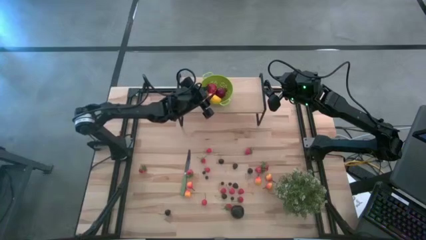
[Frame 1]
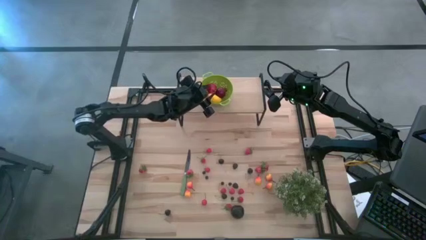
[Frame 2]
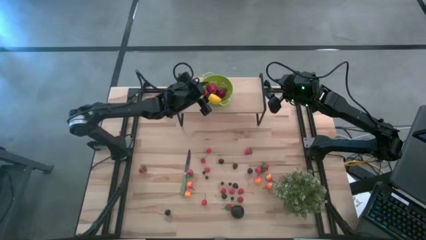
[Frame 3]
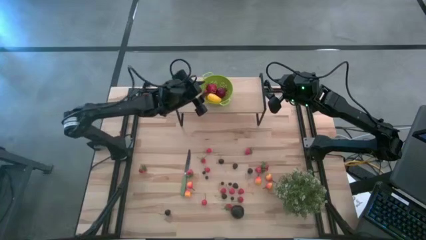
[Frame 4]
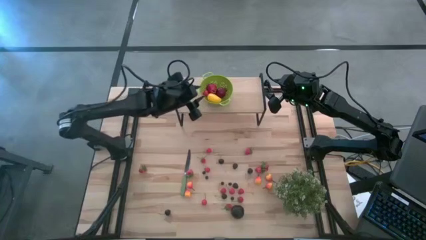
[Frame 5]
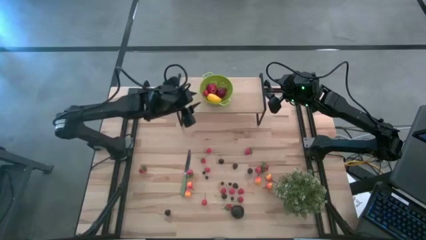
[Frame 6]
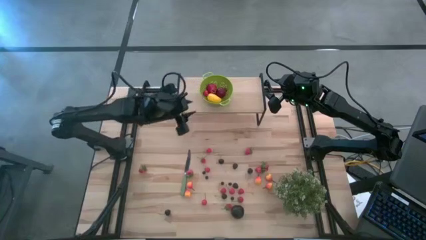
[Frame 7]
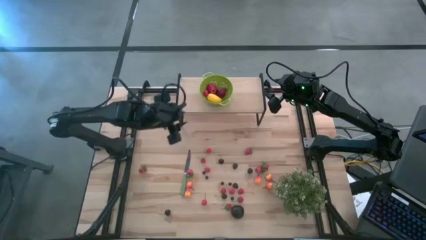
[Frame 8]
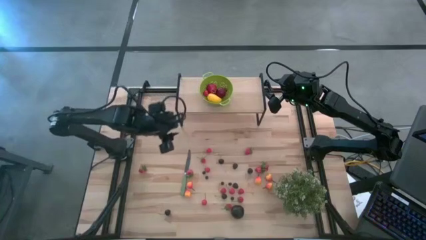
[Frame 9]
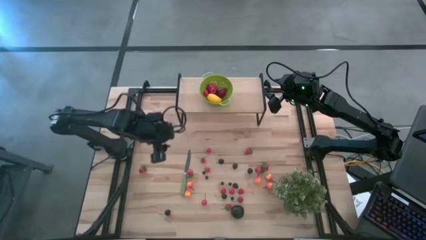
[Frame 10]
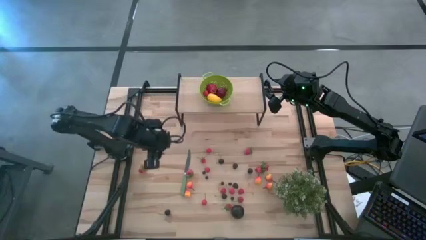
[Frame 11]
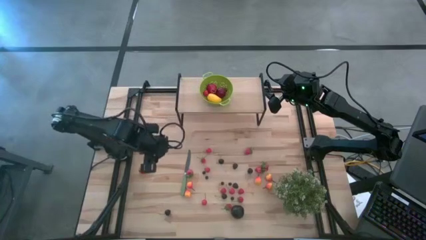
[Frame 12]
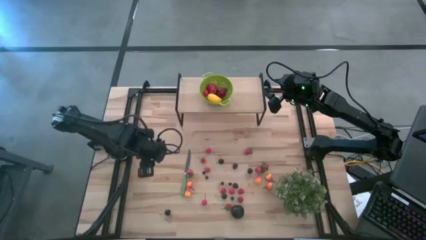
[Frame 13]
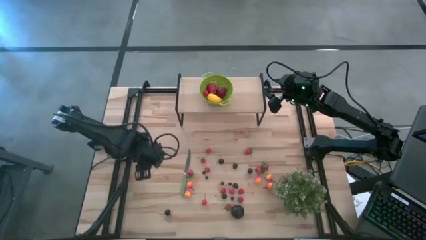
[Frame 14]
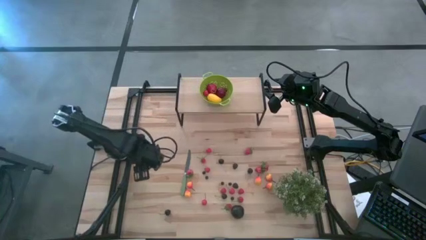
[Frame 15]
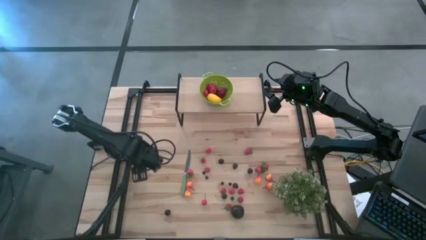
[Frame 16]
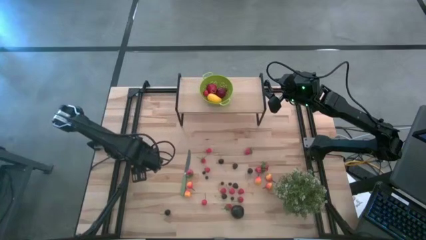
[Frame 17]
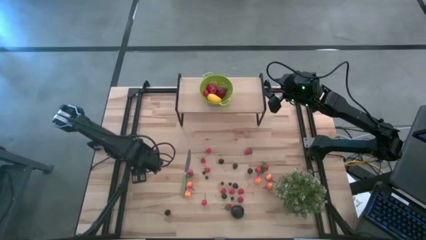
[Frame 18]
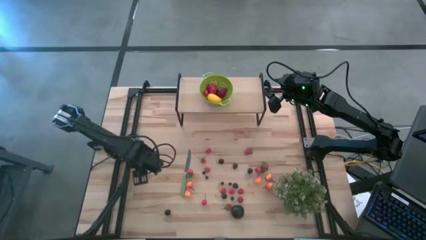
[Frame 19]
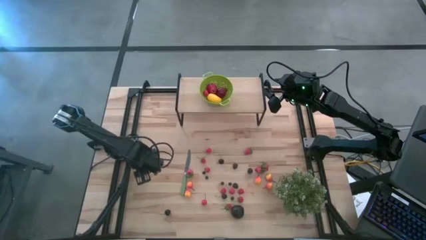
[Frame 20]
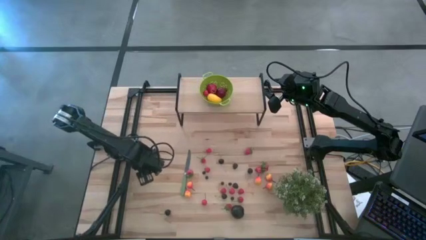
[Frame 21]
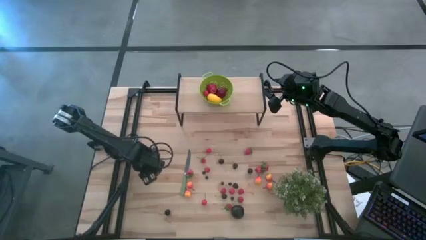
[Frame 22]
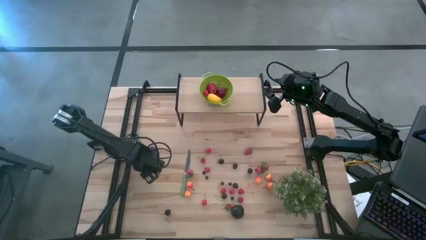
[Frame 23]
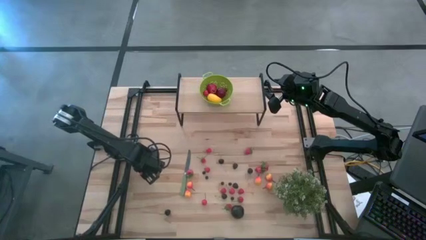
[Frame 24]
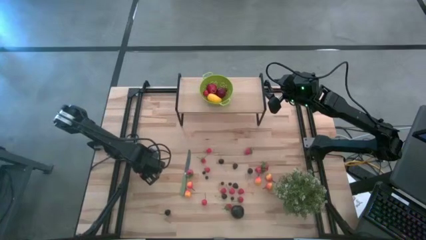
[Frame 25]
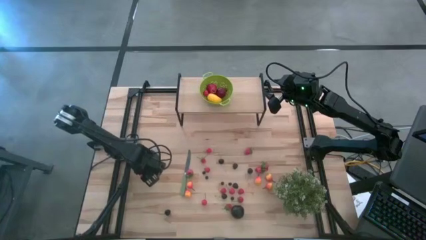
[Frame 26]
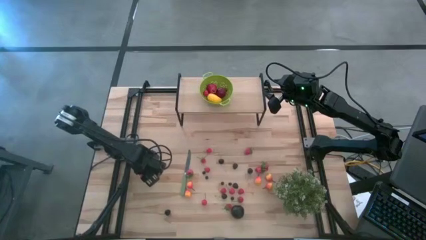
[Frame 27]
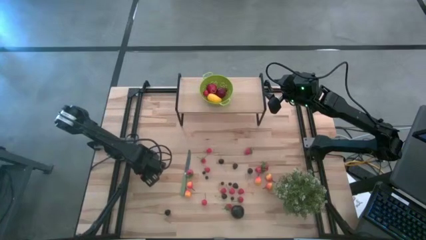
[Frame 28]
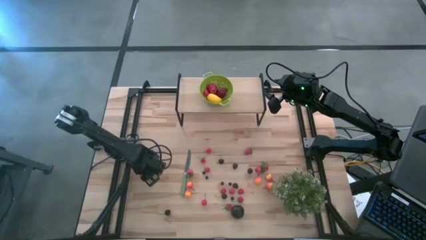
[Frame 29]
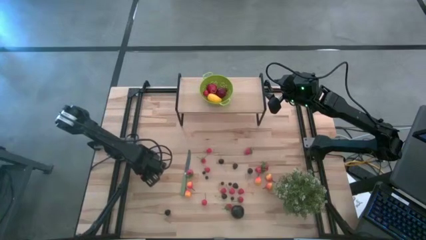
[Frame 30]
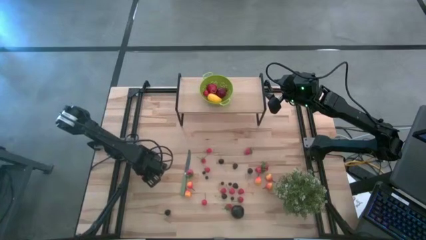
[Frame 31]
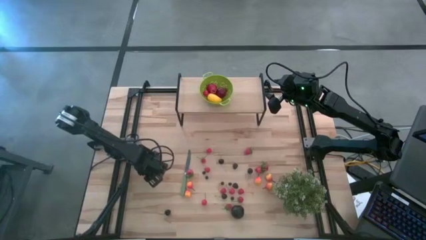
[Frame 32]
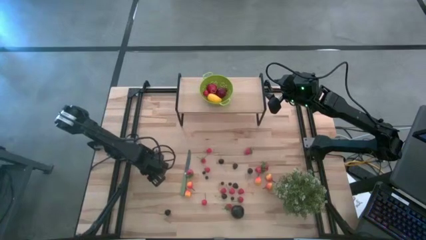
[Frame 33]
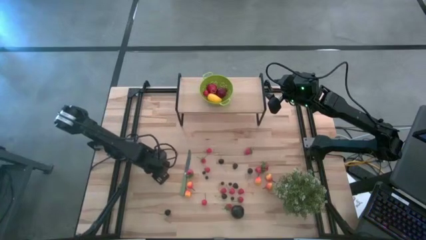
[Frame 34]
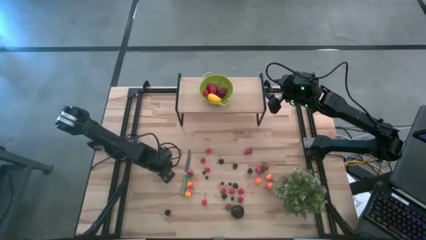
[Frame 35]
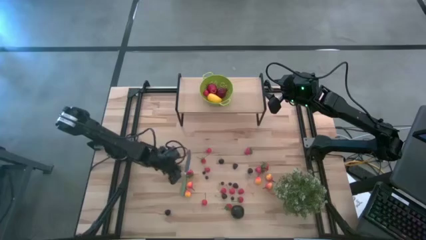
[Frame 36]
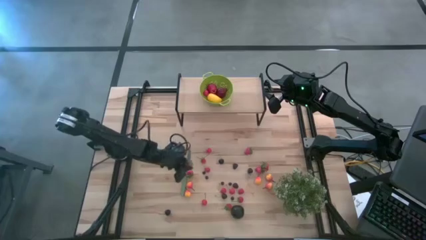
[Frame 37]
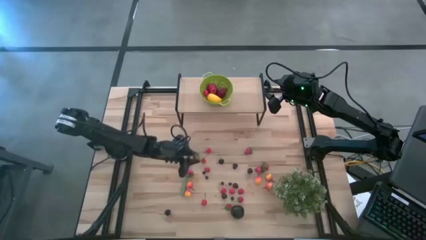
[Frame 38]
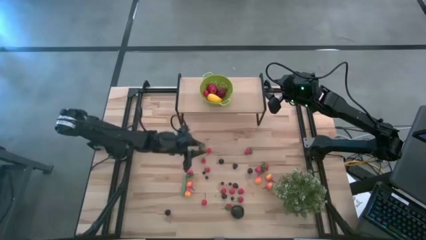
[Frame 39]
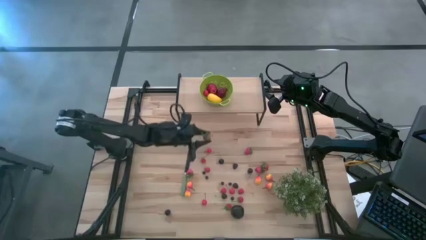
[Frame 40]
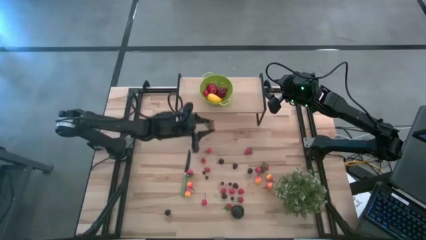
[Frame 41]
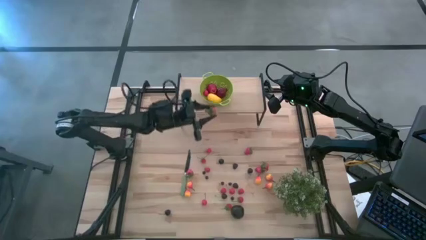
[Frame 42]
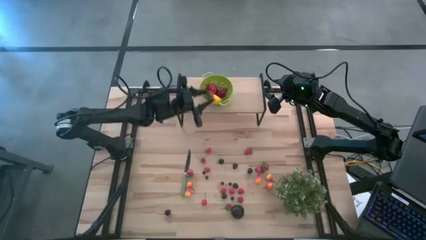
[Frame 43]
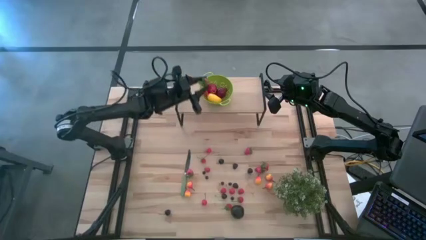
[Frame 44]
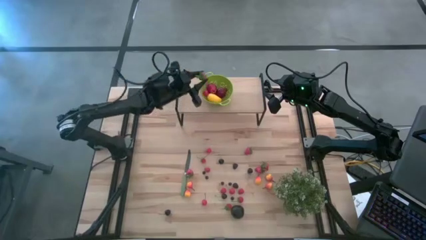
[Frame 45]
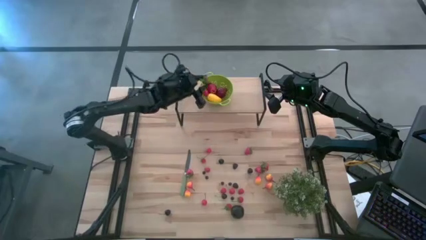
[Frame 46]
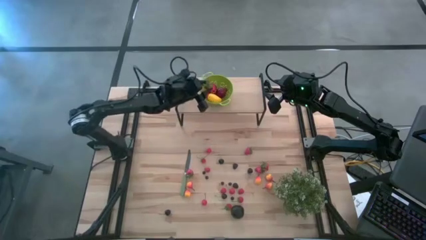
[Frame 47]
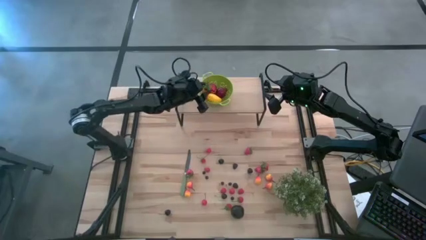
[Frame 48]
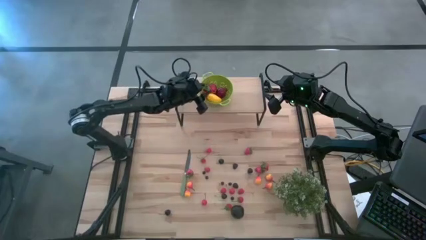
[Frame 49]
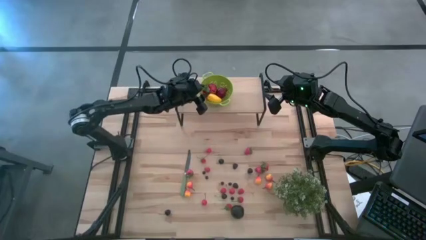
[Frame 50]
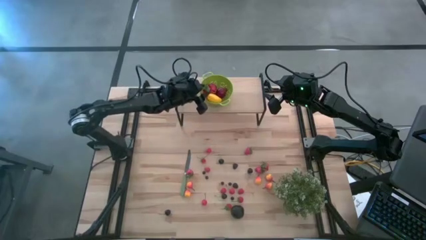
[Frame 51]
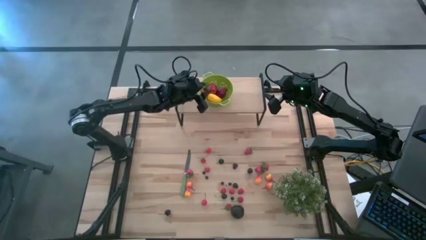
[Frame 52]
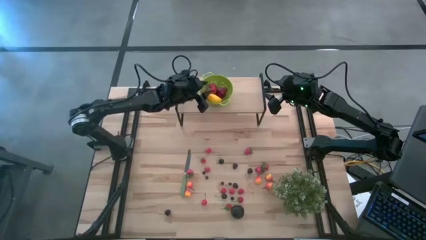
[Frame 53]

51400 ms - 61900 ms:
Task: Pick & Place Fruit
Put the strawberry into the green colander on the shelf

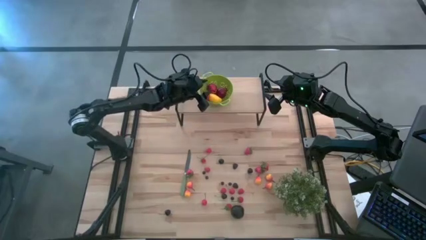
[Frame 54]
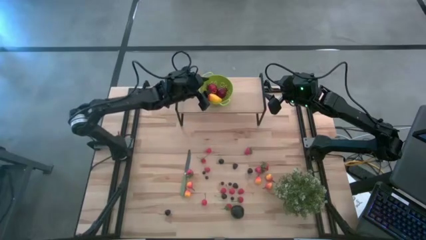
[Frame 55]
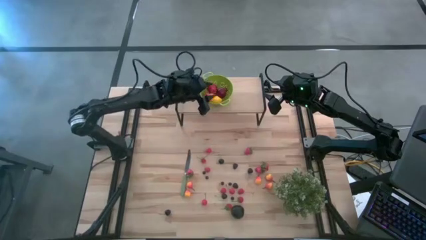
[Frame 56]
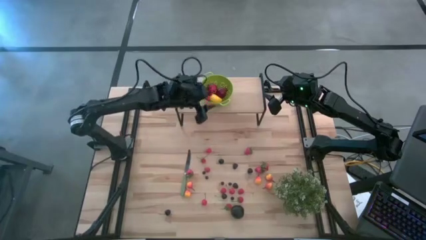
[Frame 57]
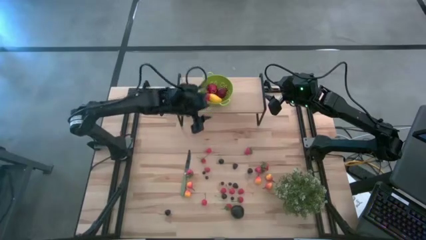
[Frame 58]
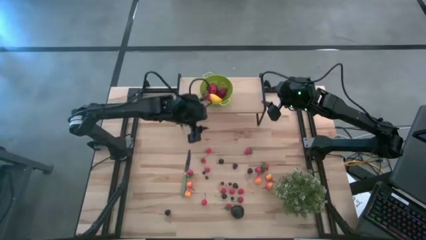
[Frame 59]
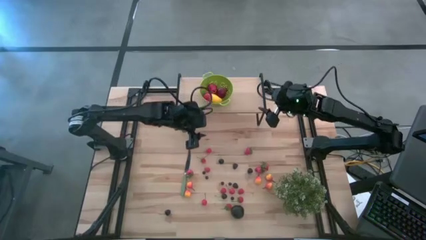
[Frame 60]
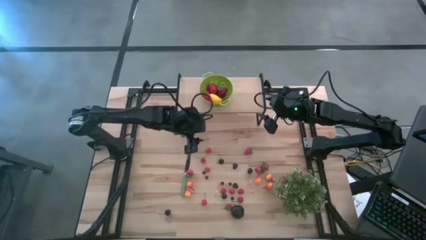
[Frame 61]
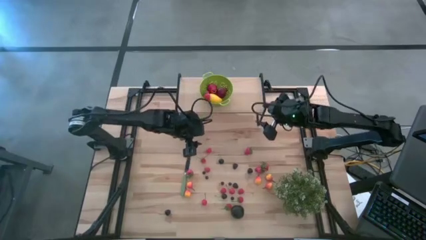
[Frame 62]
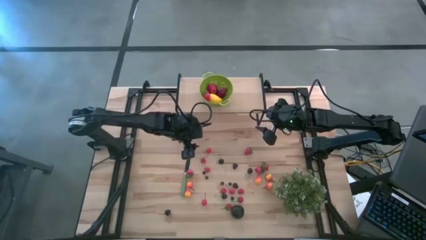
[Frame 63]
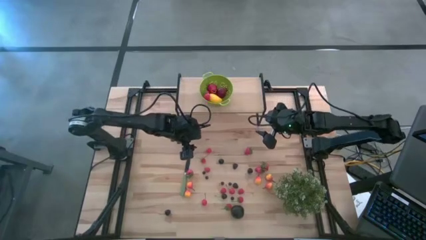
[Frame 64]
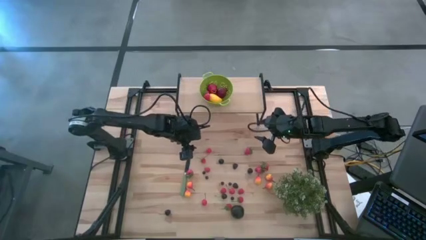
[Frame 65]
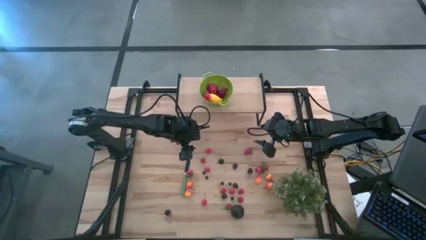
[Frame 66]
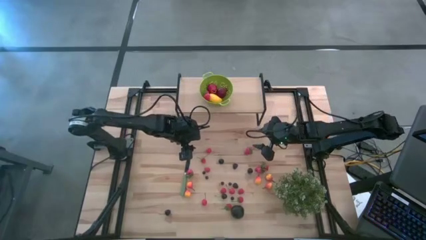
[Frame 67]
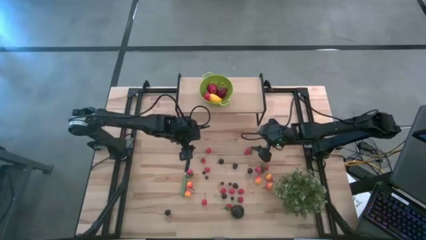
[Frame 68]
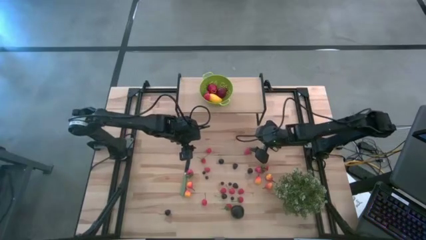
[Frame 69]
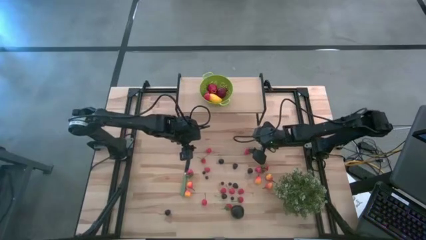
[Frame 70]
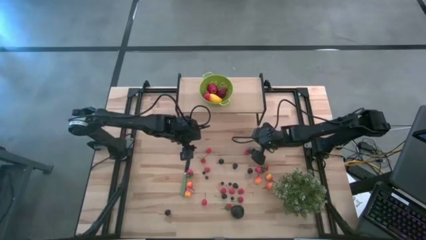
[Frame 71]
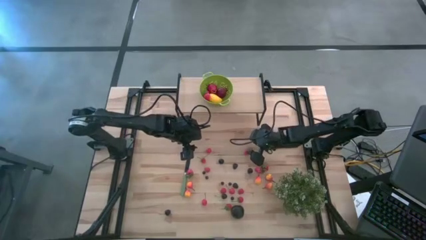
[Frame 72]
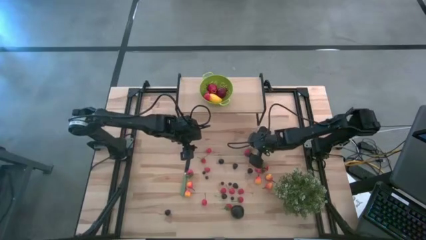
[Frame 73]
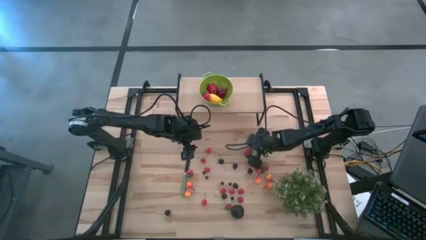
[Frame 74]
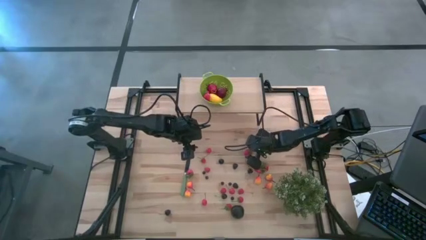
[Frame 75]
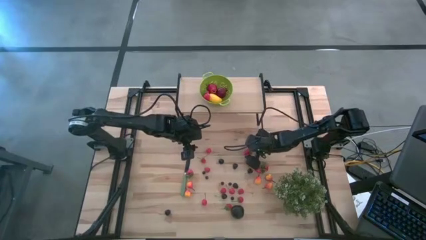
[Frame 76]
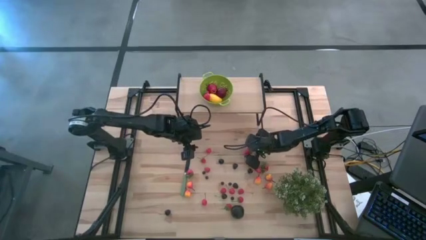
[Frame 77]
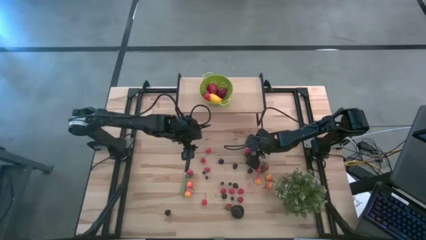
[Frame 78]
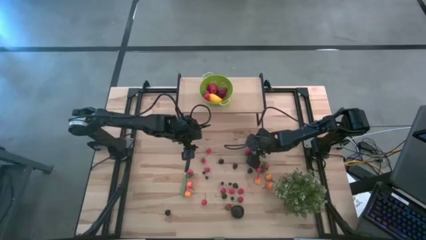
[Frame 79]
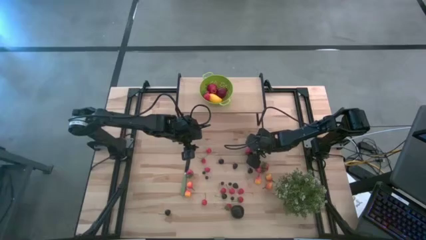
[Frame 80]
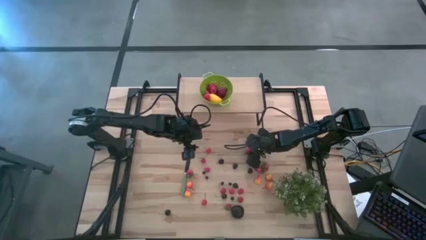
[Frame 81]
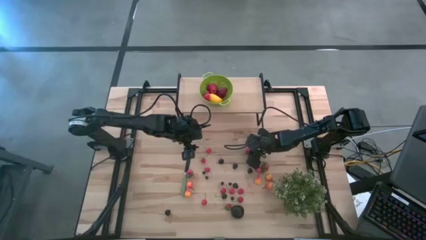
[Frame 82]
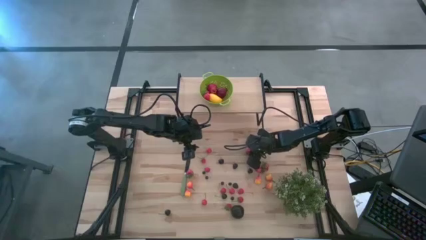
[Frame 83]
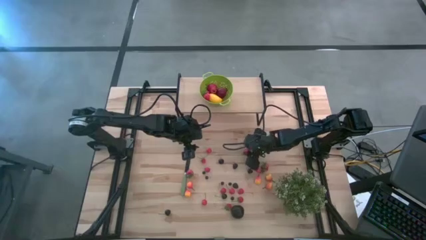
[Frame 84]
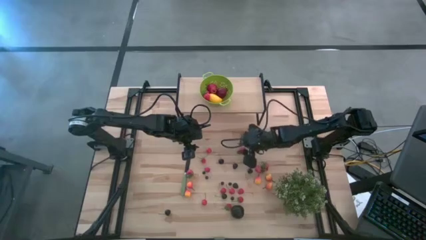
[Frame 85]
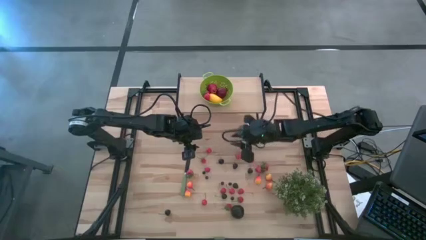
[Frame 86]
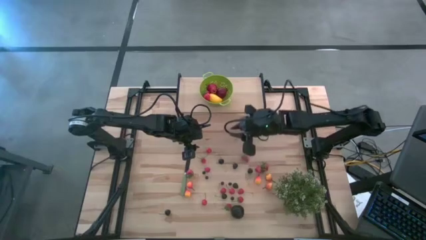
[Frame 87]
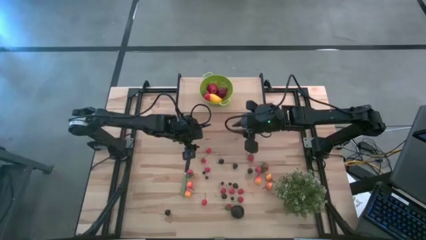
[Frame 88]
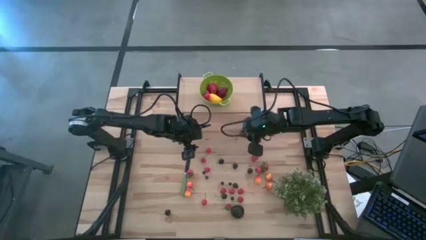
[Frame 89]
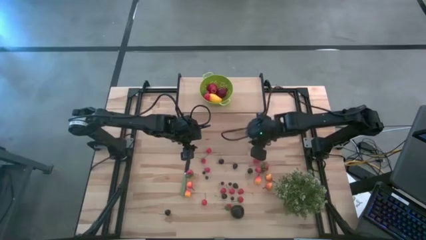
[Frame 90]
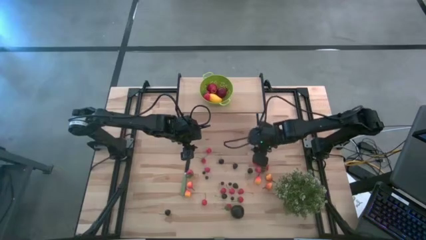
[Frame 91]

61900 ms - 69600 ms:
Put the strawberry into the green colander on the shelf
